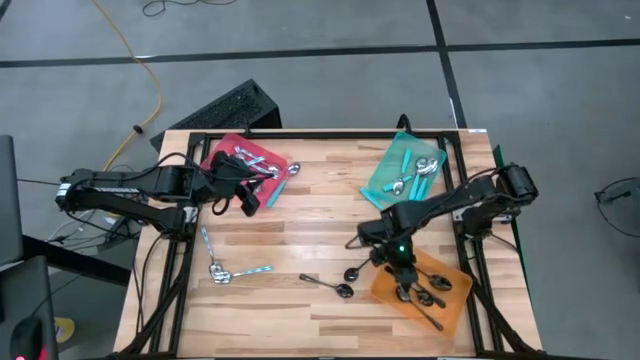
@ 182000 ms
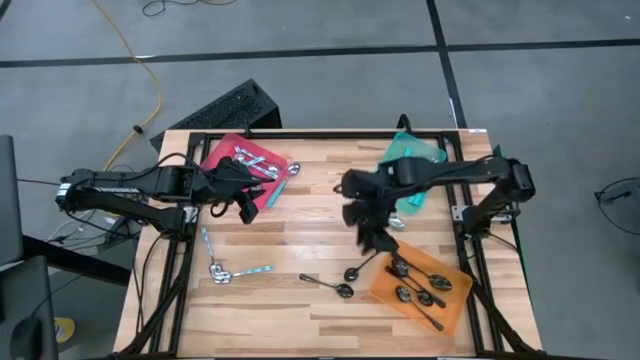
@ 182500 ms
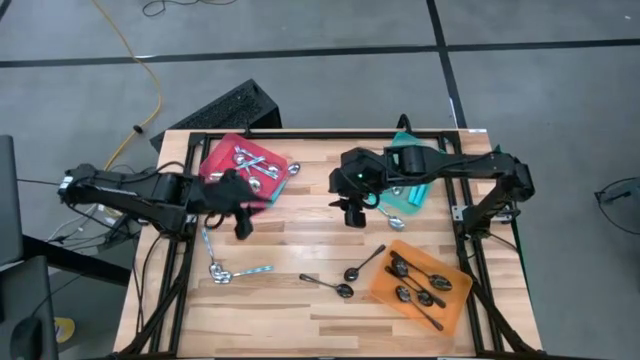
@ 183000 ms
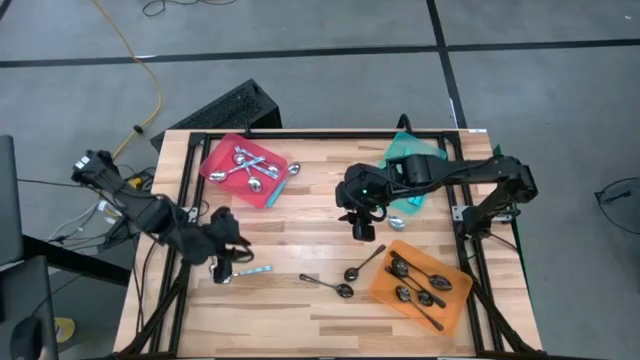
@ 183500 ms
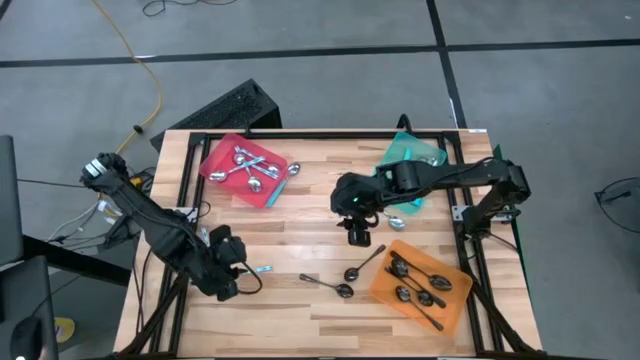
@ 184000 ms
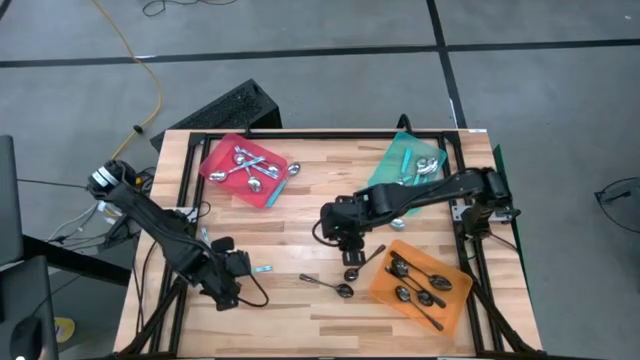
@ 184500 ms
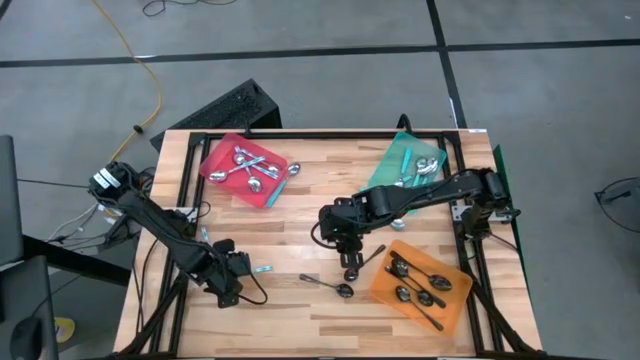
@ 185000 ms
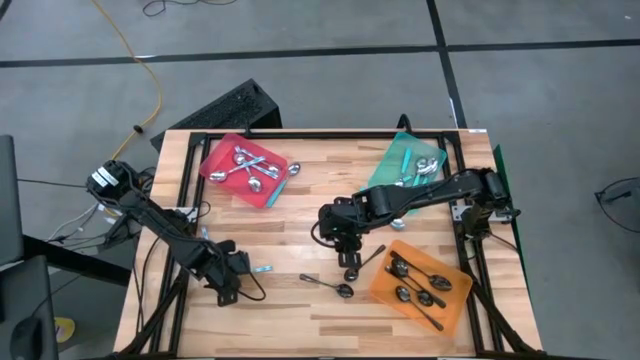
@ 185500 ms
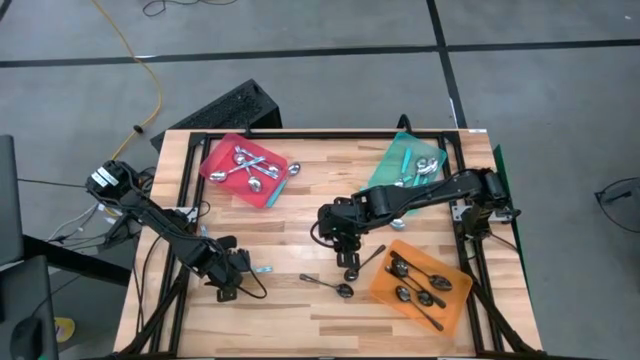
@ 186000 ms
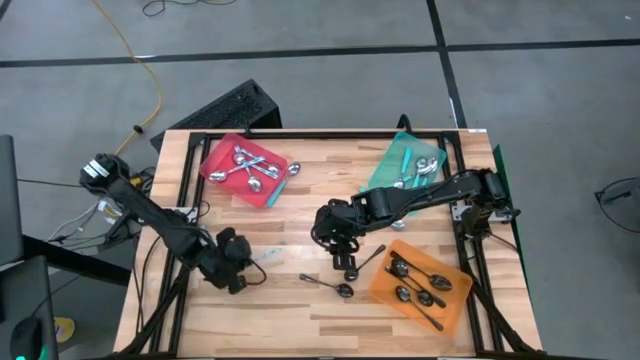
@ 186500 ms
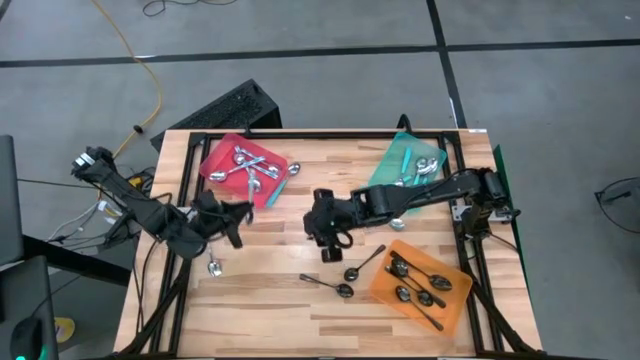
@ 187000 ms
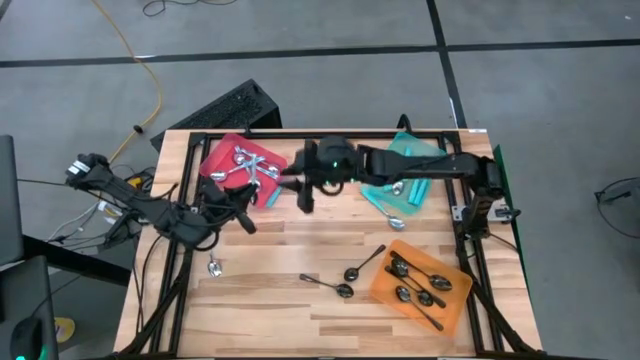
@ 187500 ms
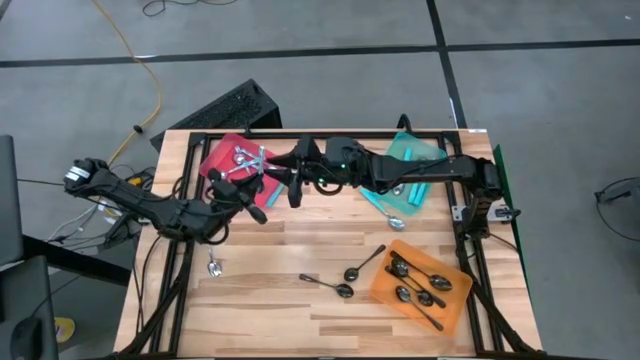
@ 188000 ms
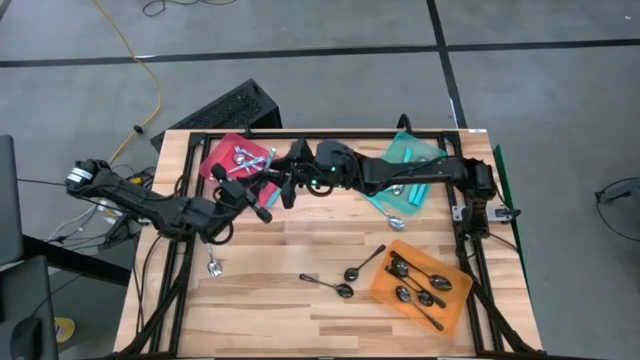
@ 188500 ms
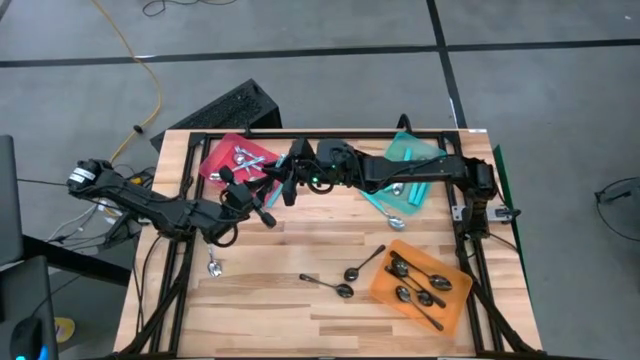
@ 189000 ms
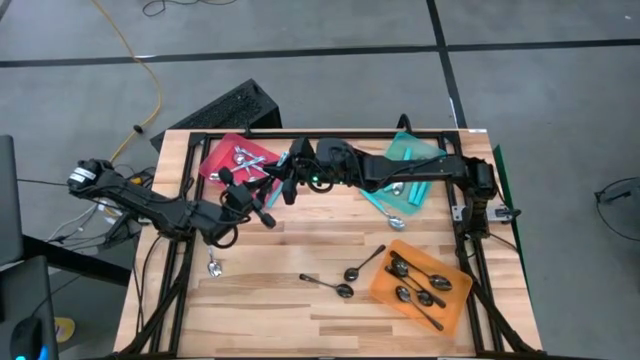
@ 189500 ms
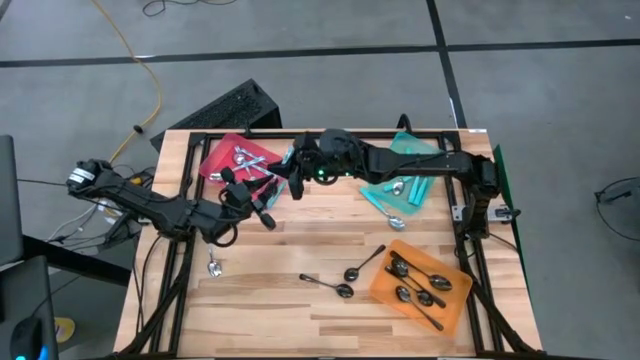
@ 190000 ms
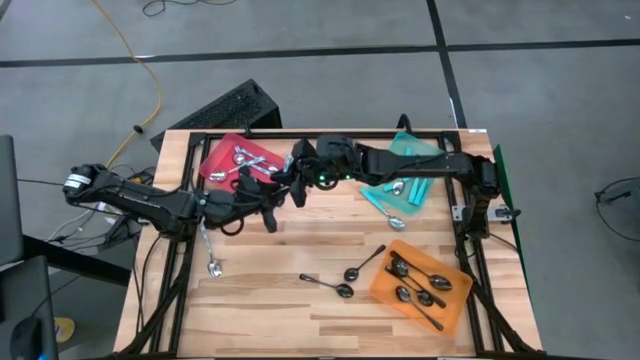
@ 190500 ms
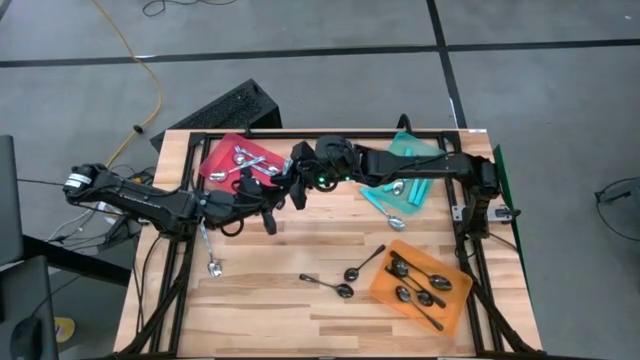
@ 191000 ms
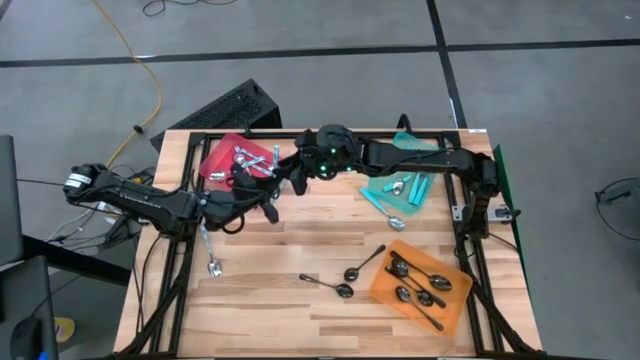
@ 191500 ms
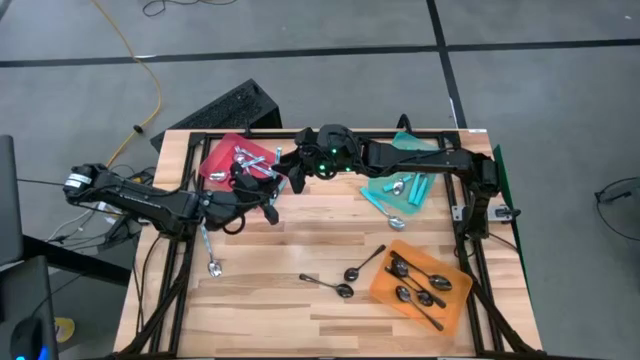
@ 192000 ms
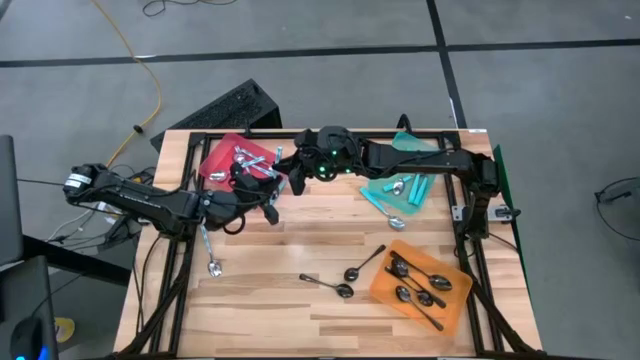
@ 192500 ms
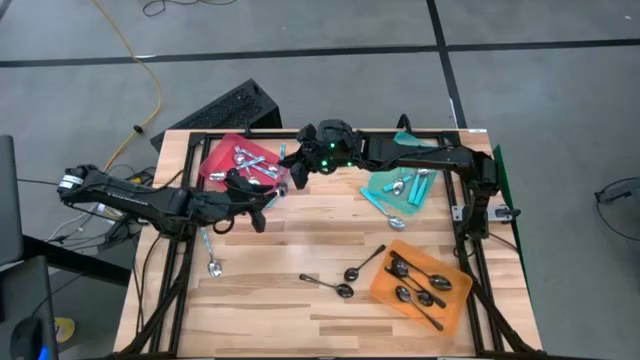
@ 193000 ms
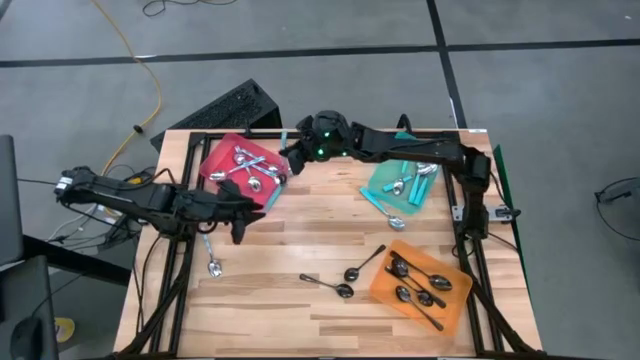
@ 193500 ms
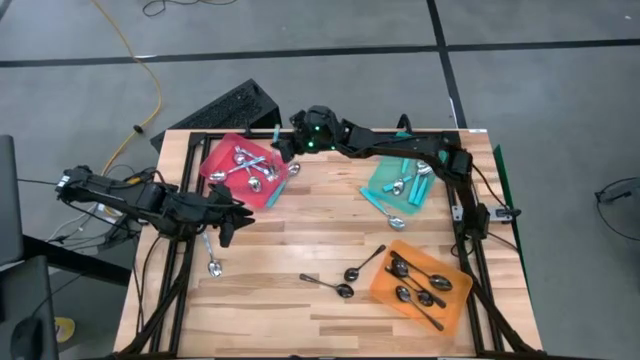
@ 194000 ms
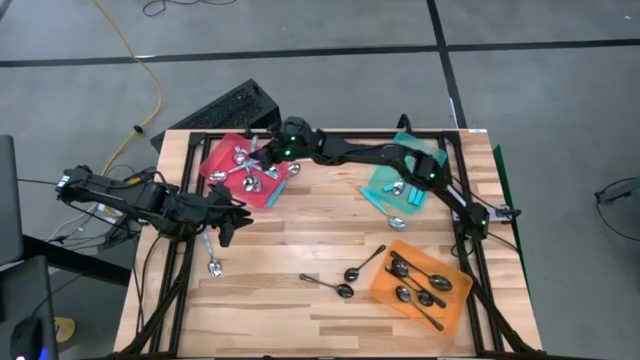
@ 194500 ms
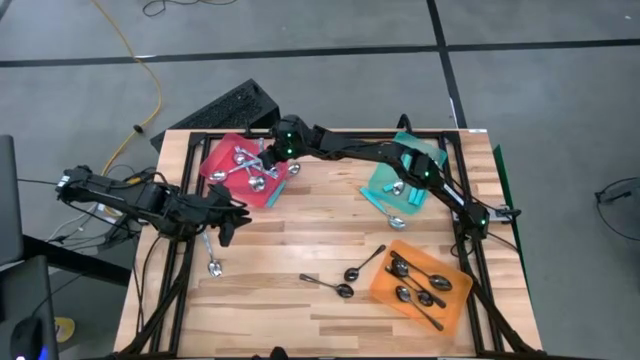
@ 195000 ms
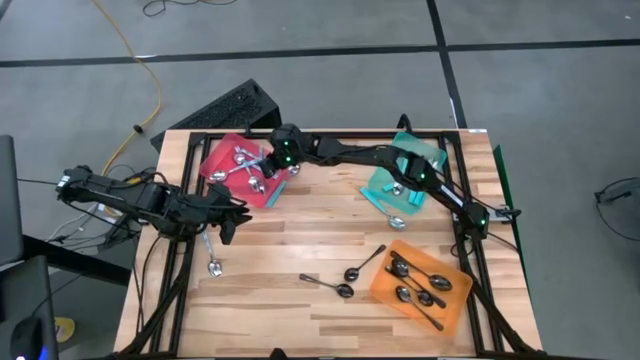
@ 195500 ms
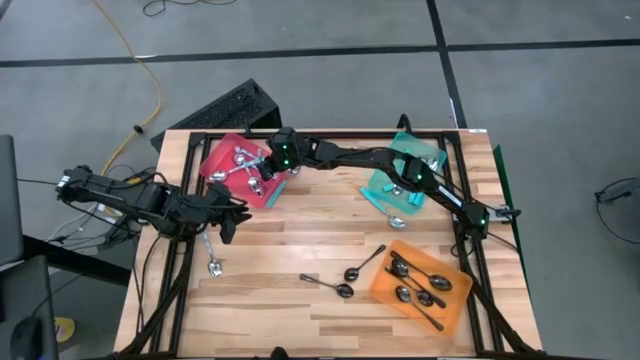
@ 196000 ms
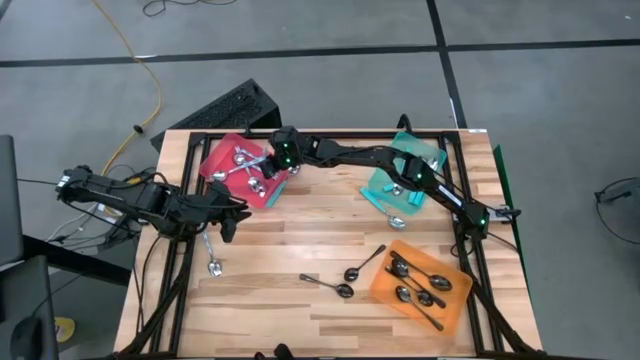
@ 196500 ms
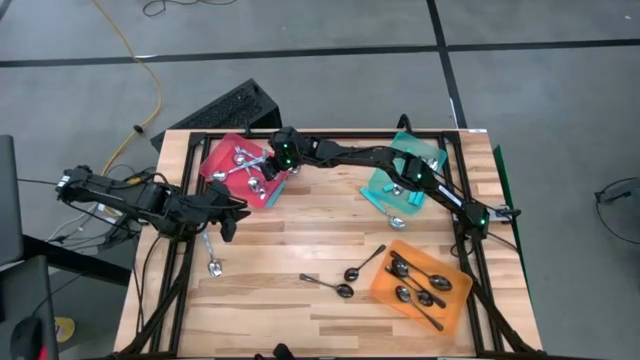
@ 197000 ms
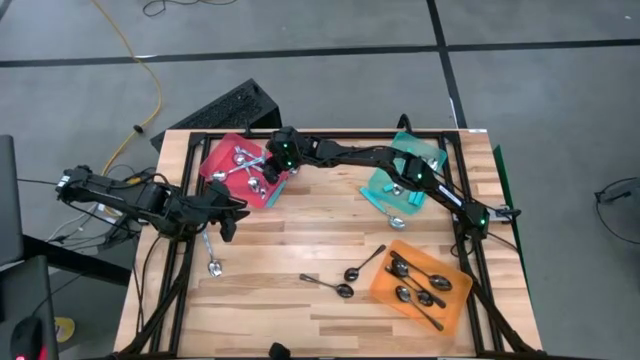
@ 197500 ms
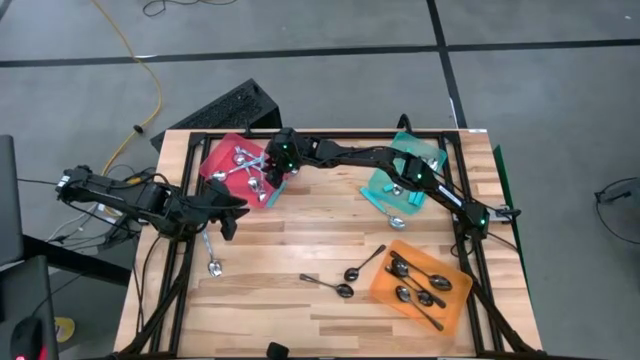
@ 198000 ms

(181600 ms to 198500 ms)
Task: Sort silverware by color (type)
Put the blue patterned spoon into the red bin

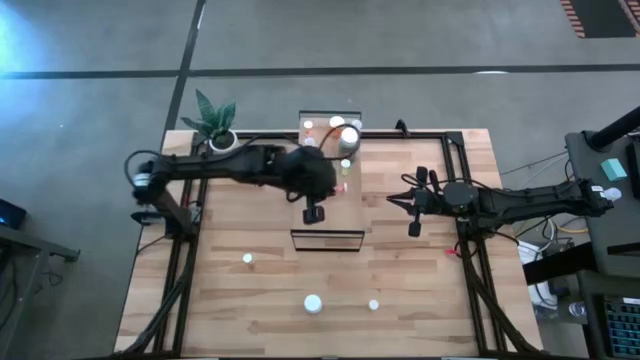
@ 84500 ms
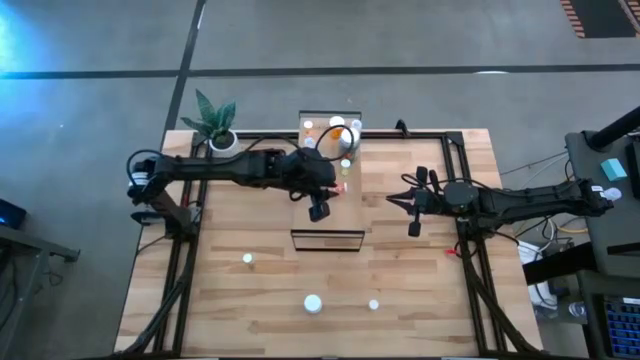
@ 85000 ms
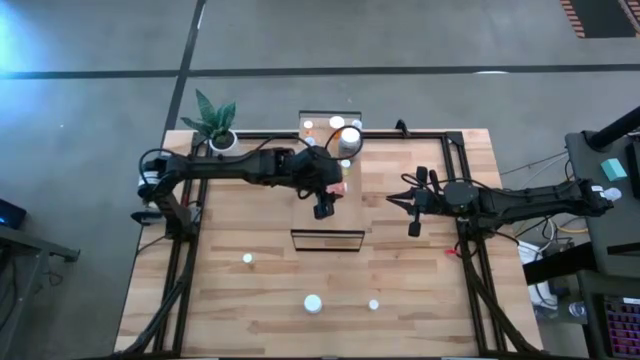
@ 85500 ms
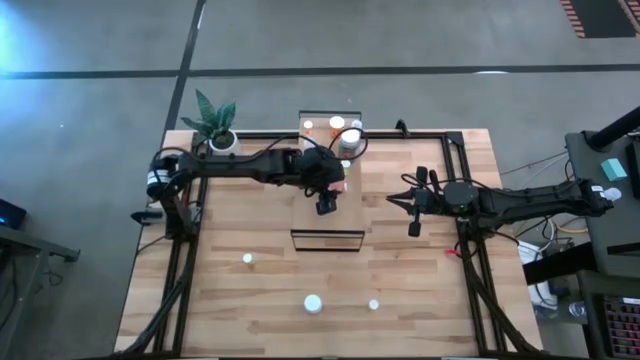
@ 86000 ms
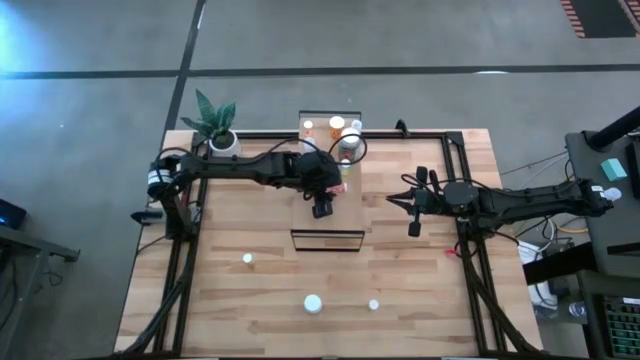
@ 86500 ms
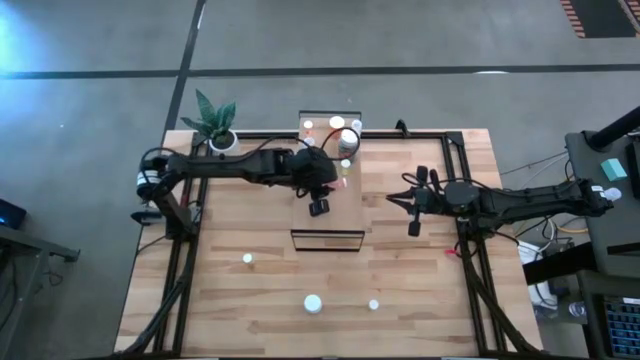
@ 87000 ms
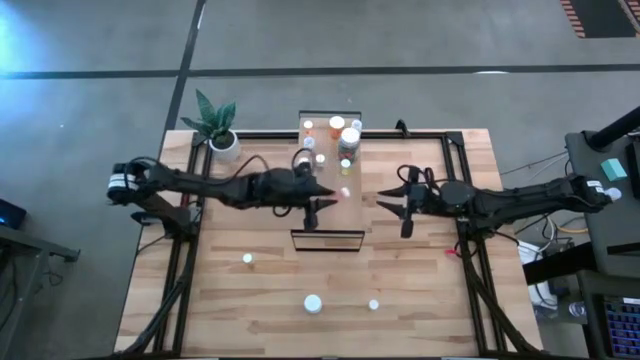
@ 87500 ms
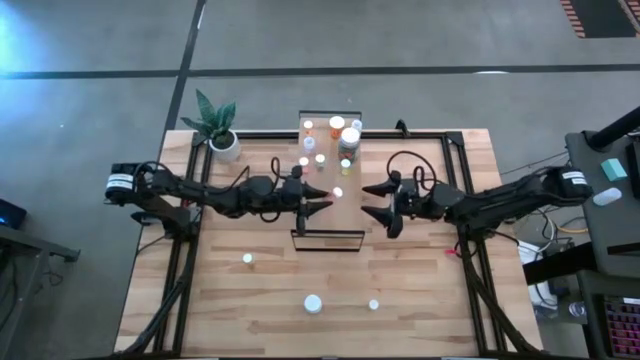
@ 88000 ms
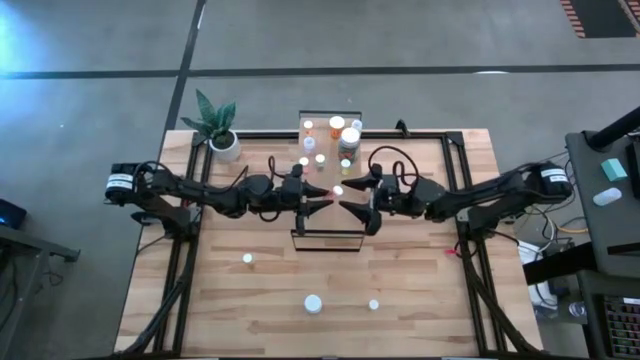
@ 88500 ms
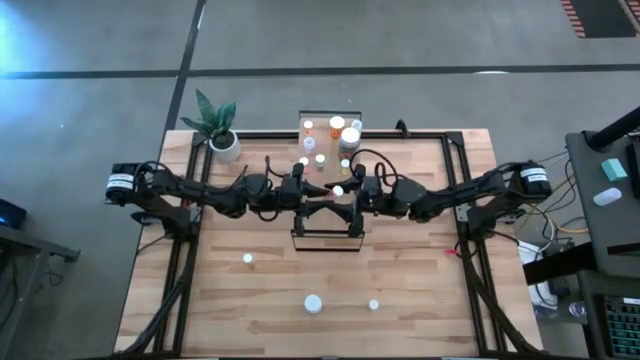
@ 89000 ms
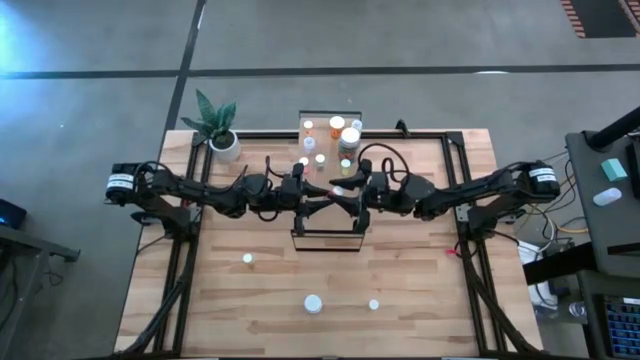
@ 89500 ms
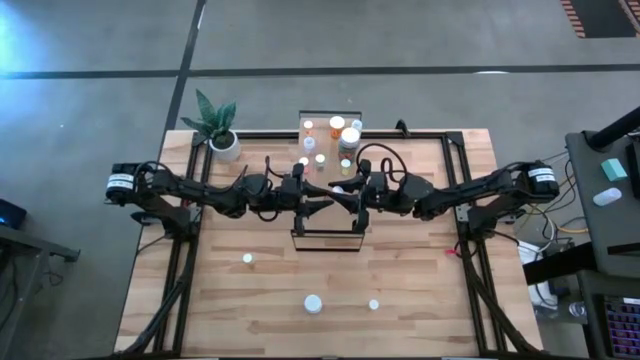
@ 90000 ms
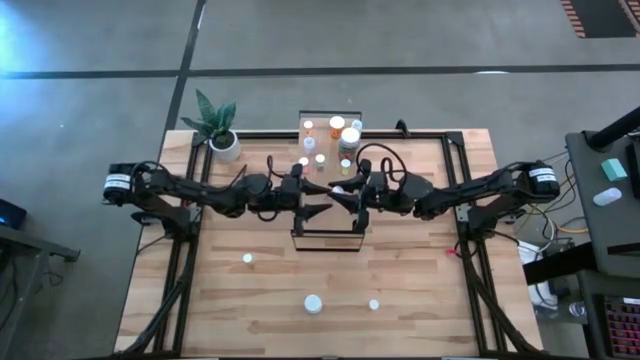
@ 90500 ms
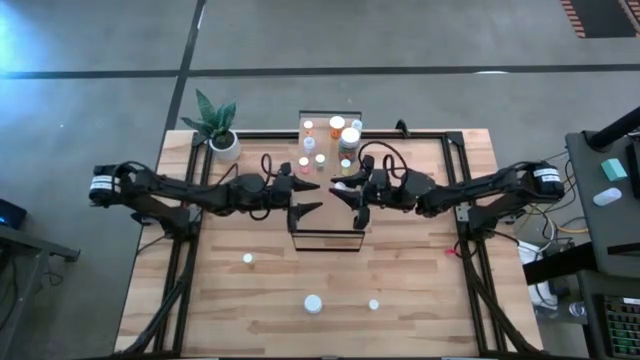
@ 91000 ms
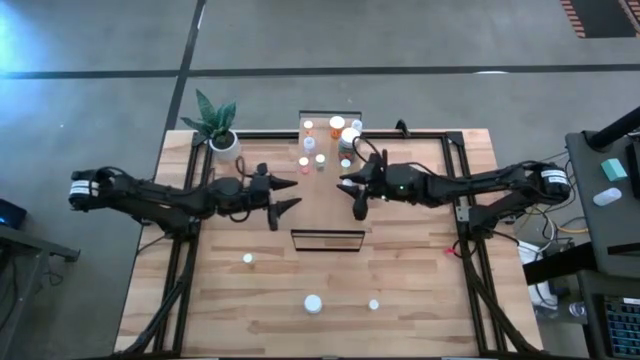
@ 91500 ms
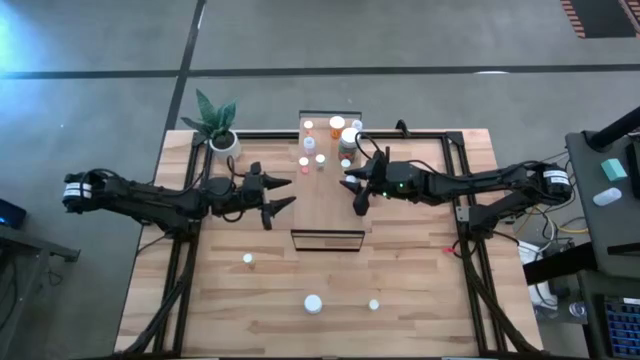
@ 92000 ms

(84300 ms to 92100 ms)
Task: Pick and place medicine bottles onto shelf by color
Put the red pill bottle on the shelf
